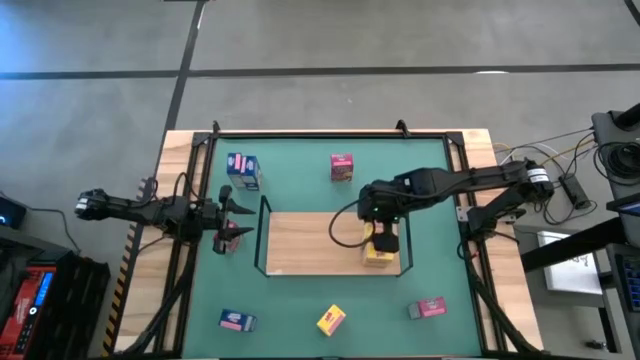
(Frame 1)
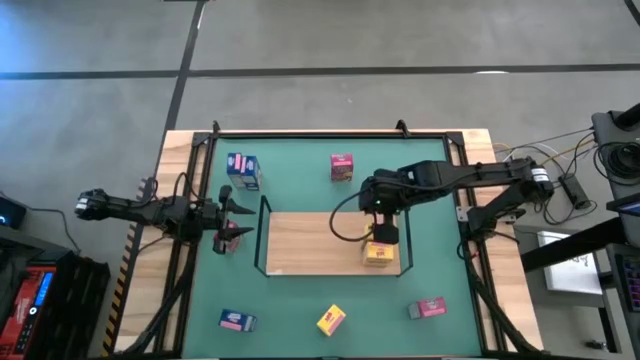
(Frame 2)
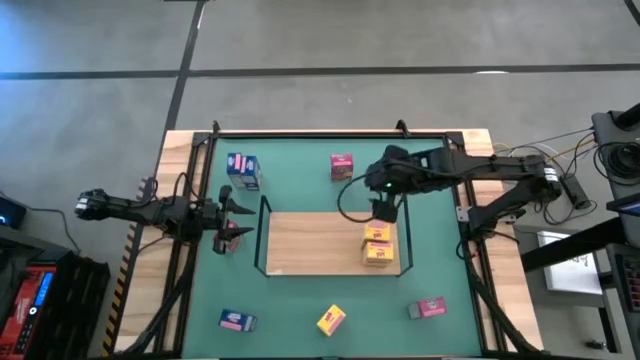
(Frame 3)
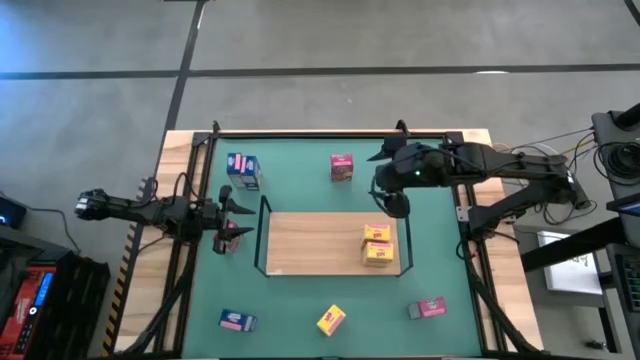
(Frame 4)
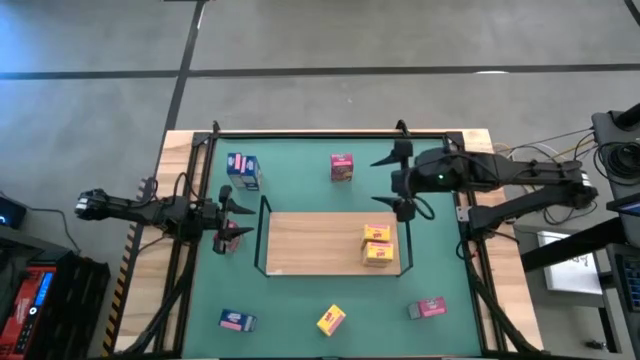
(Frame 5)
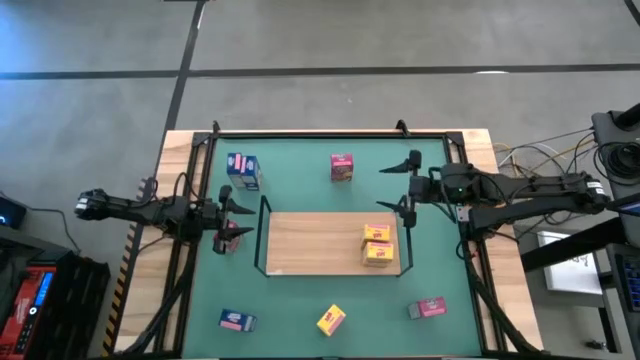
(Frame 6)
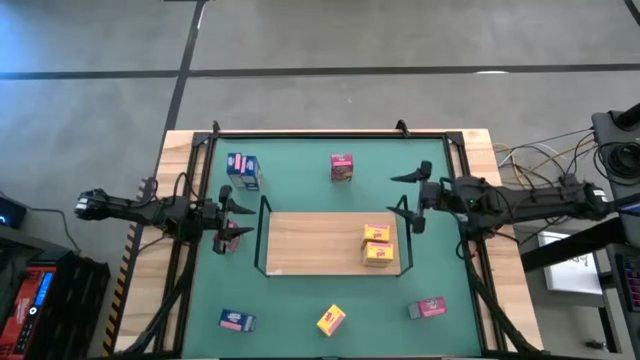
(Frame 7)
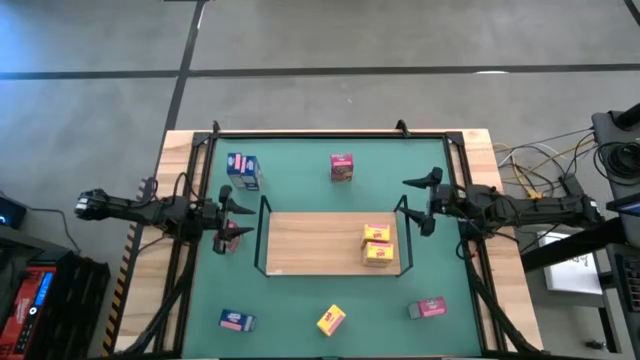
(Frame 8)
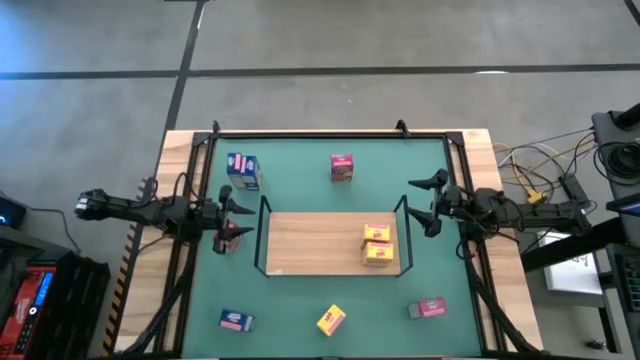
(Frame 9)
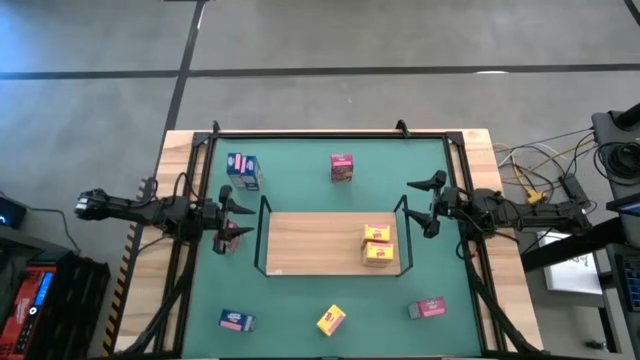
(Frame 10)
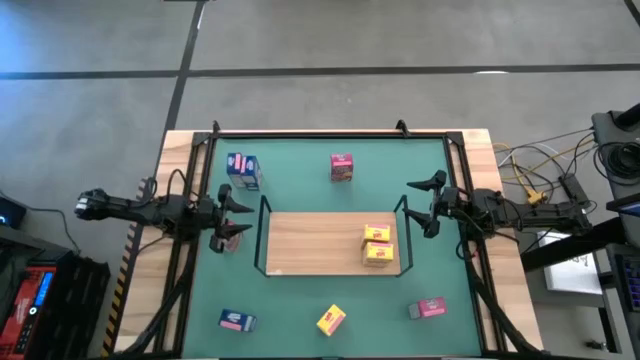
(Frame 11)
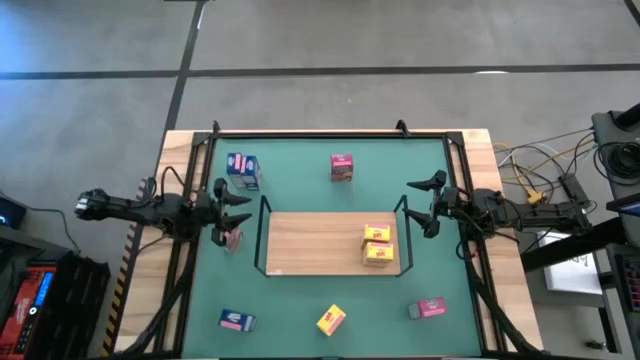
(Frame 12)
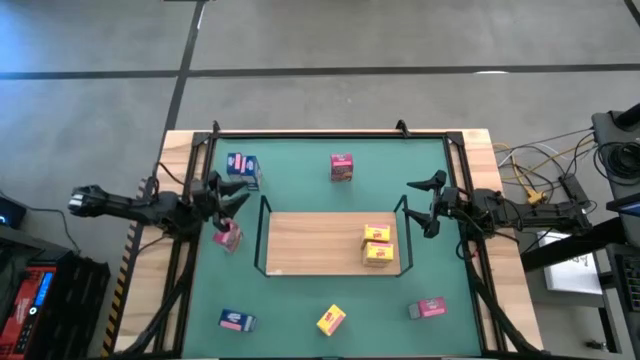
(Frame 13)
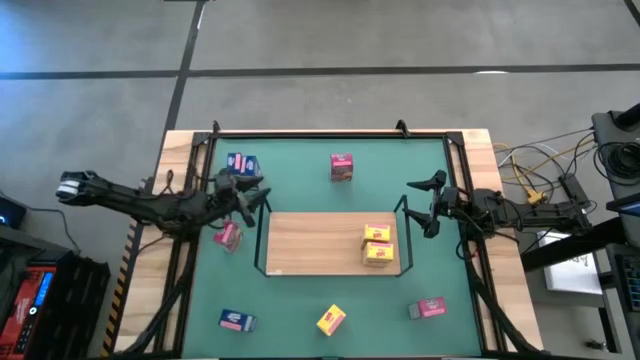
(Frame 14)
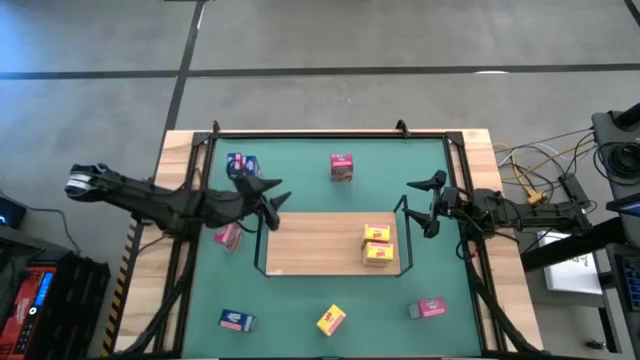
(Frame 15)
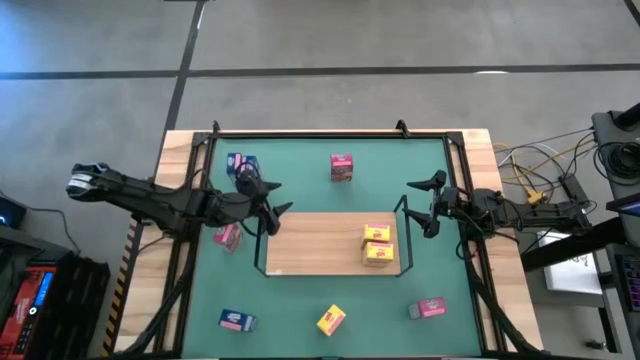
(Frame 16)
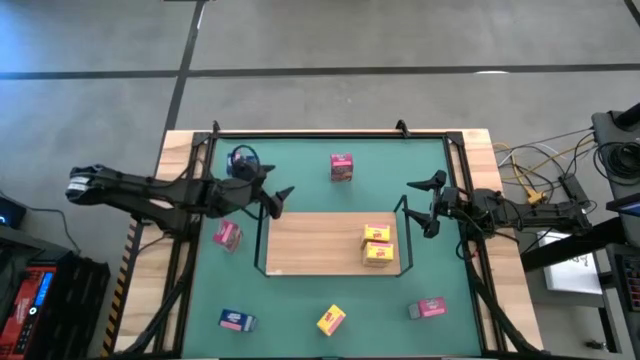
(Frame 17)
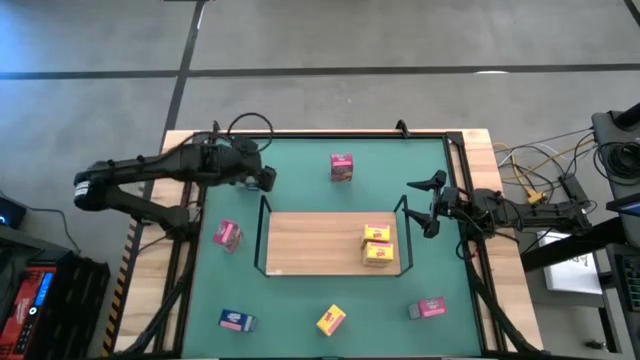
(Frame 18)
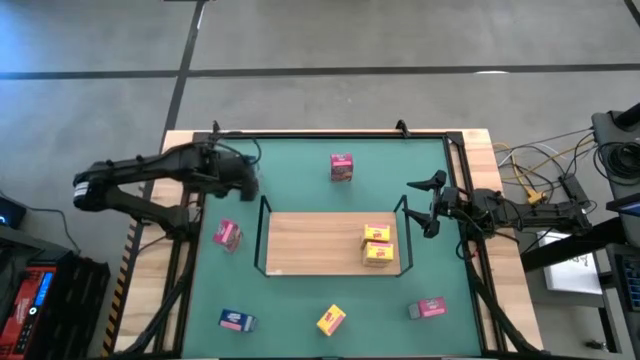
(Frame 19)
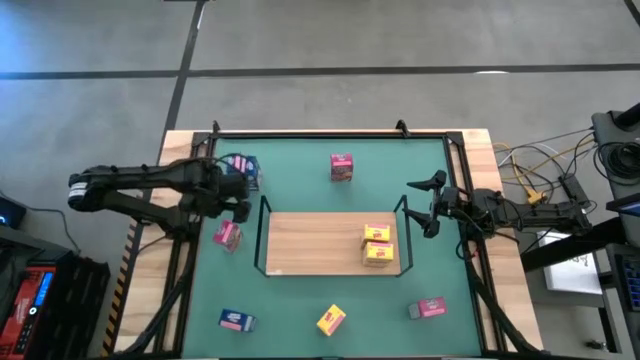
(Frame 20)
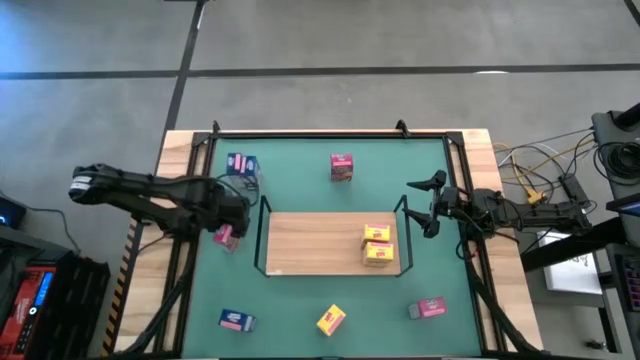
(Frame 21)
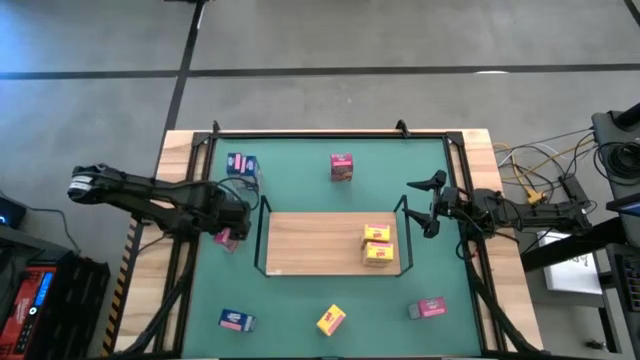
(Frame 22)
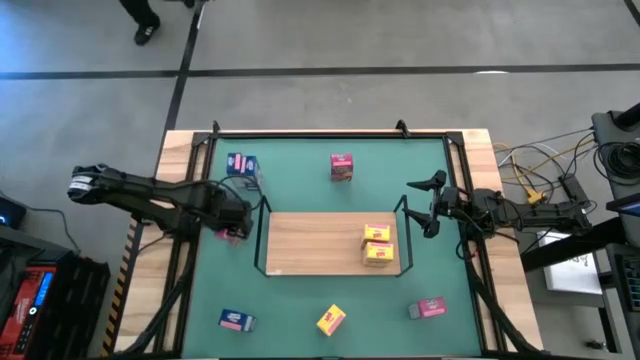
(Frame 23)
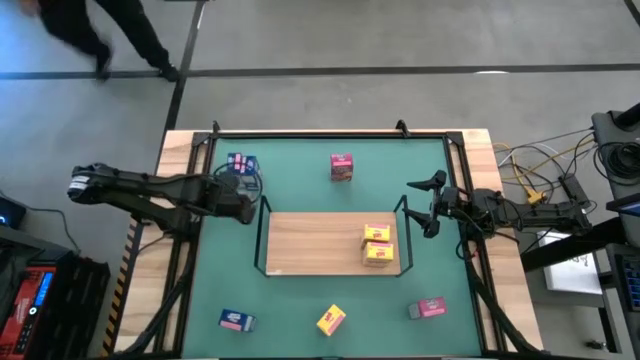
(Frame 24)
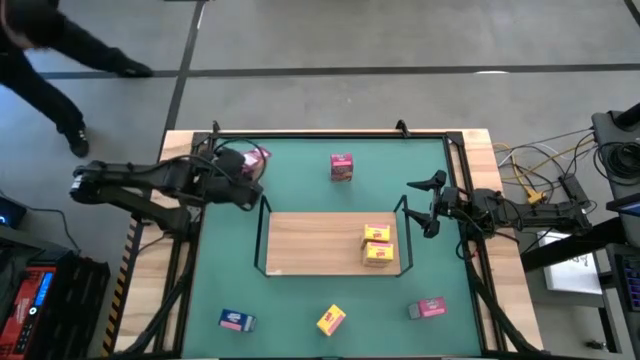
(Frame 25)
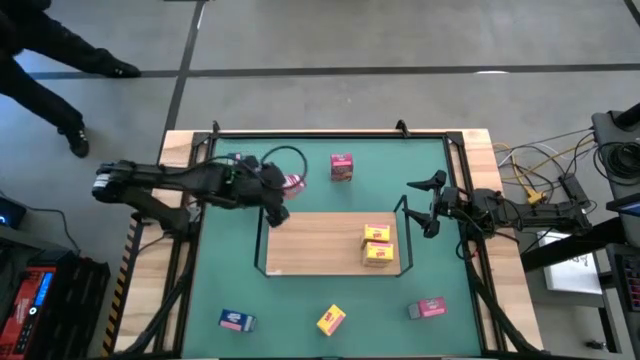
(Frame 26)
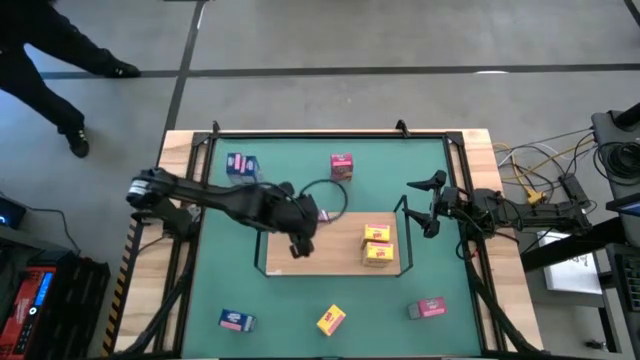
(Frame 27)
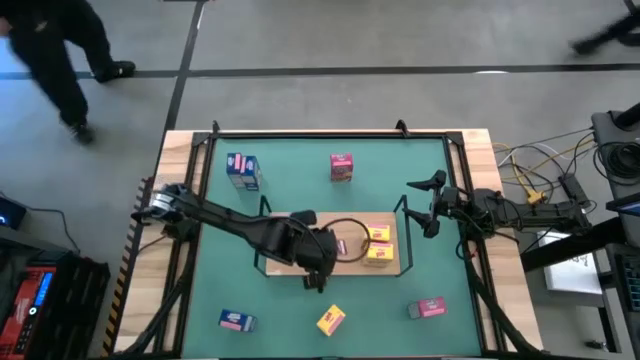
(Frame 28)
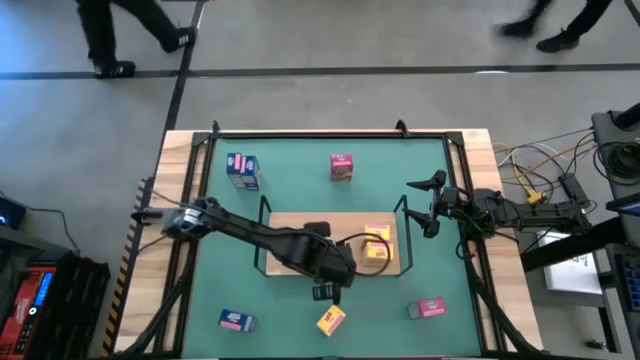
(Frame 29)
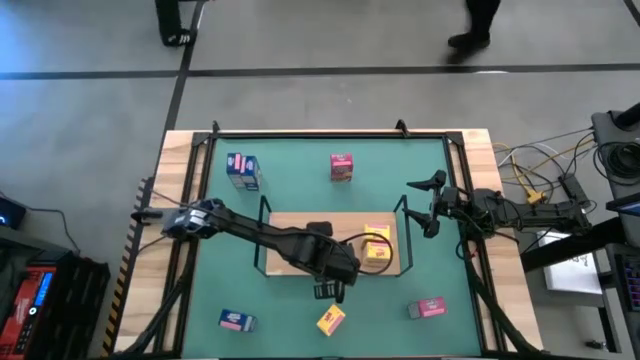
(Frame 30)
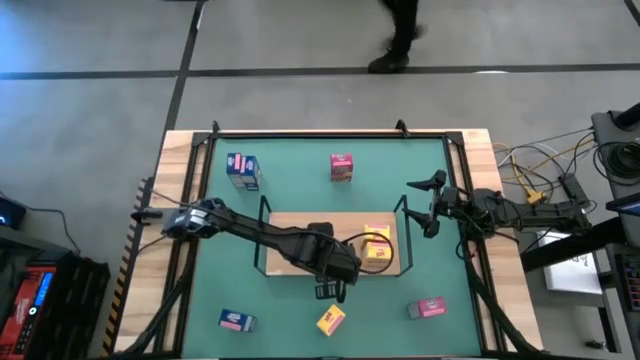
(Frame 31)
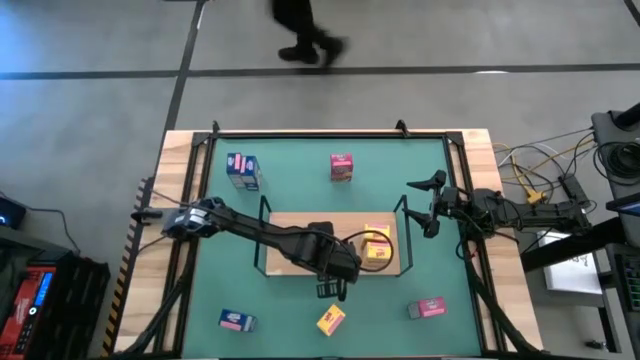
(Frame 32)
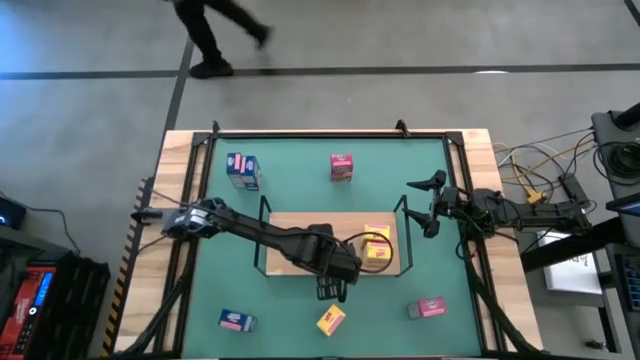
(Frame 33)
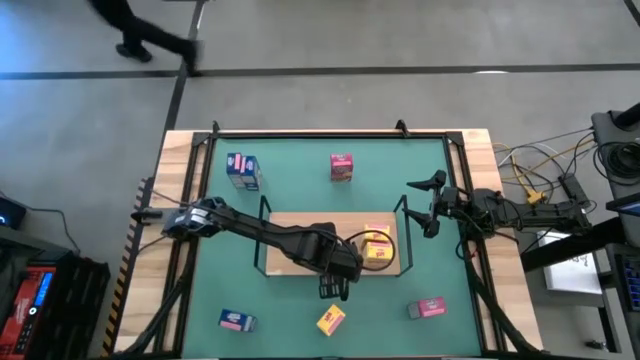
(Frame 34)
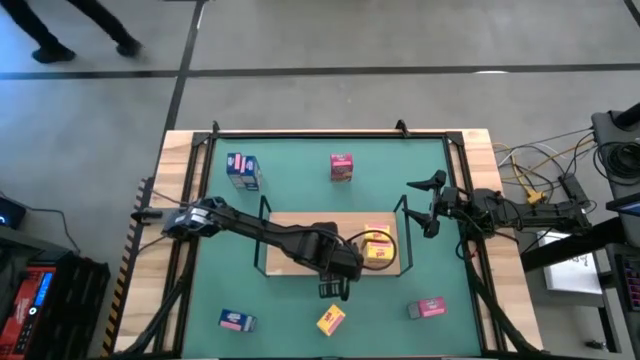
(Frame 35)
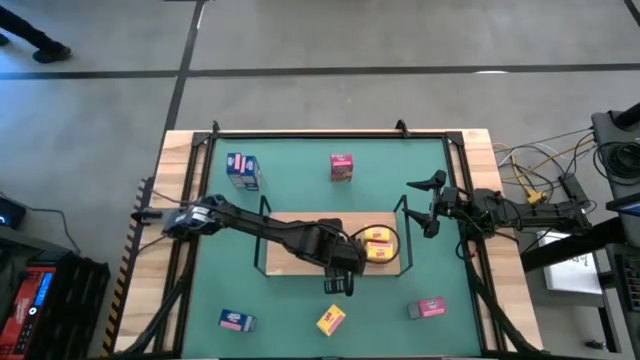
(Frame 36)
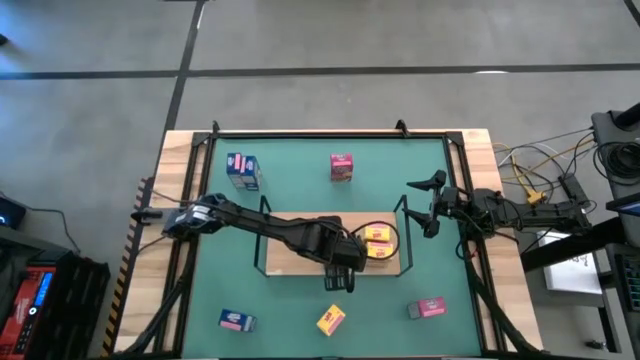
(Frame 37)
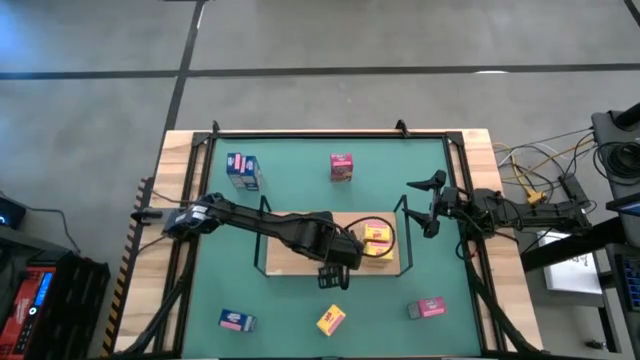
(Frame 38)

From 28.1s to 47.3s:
Task: Stack cereal on shelf
Put the middle pink cereal box on the shelf

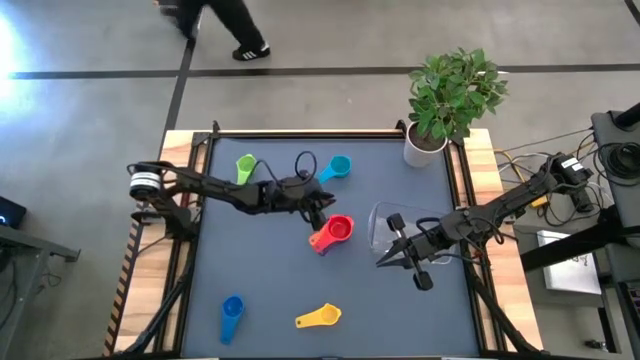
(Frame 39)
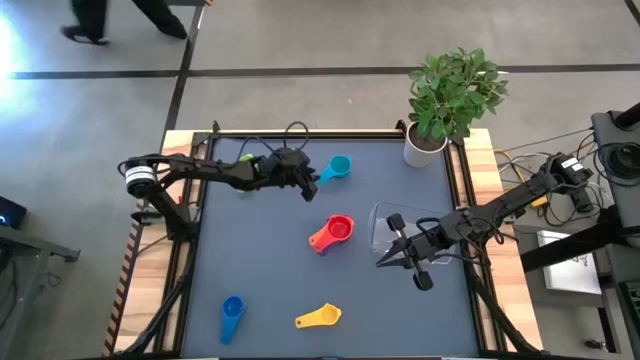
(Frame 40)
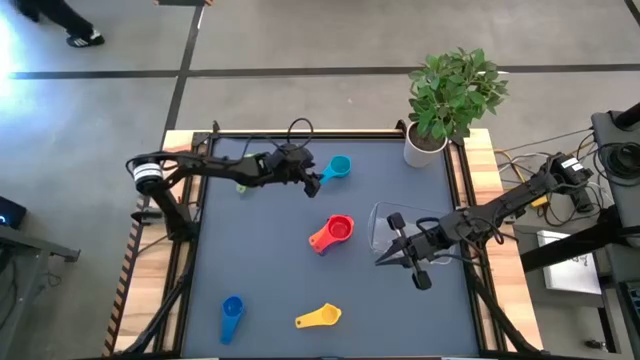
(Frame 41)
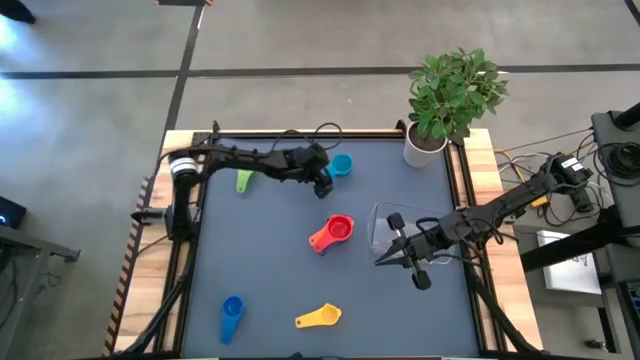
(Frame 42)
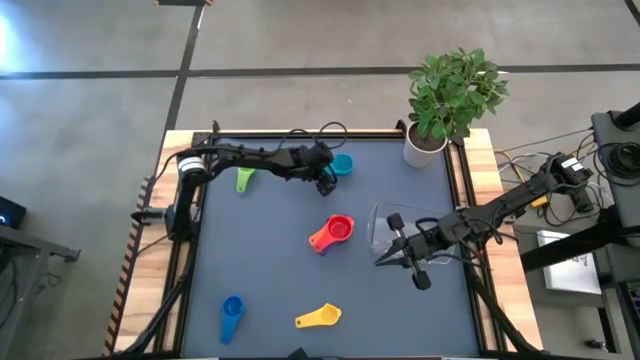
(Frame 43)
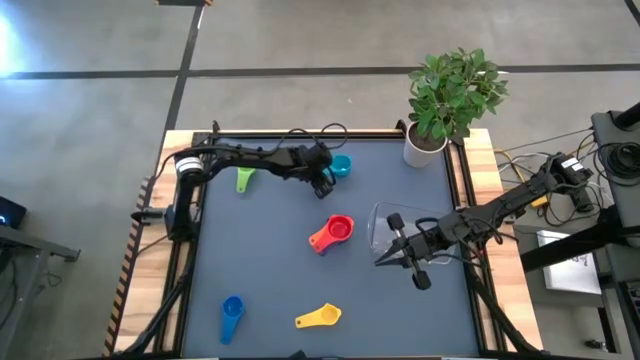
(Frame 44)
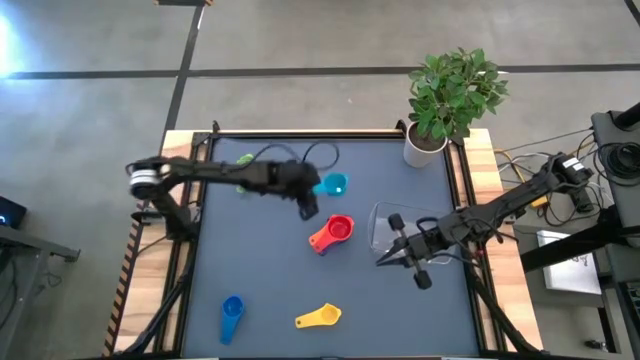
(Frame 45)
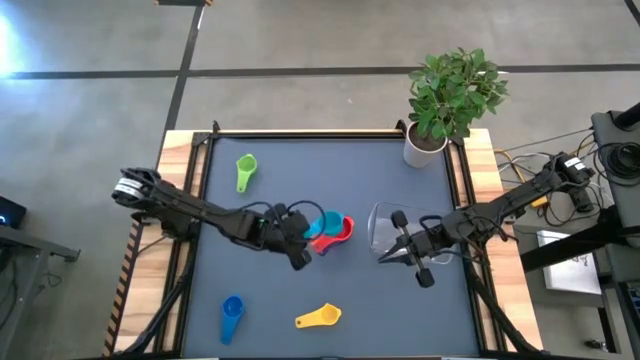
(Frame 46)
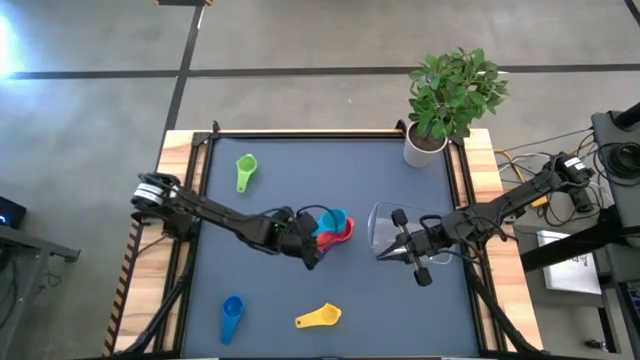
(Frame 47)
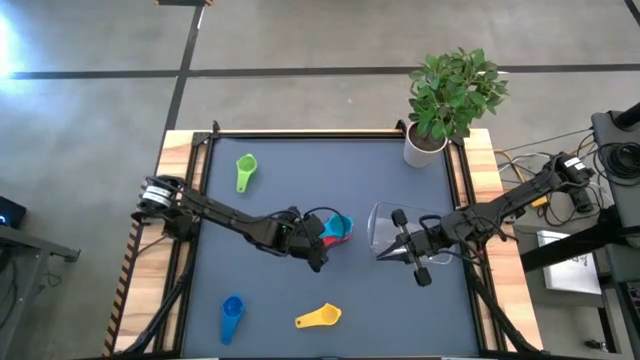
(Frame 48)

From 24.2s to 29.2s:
Task: Nest measuring cups in basket
Stack the light blue measuring cup on the red measuring cup
